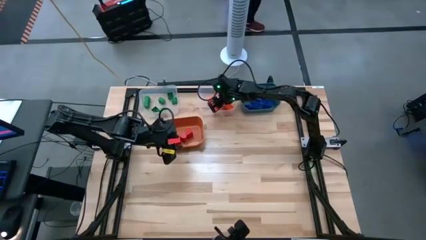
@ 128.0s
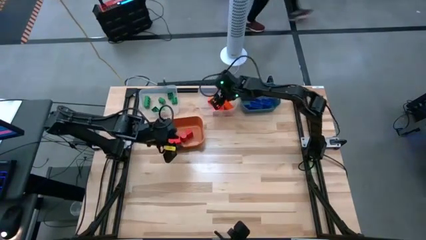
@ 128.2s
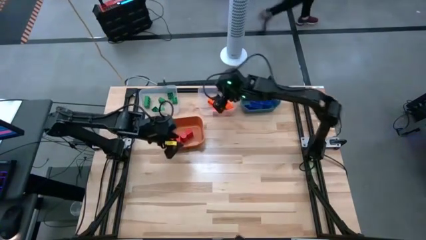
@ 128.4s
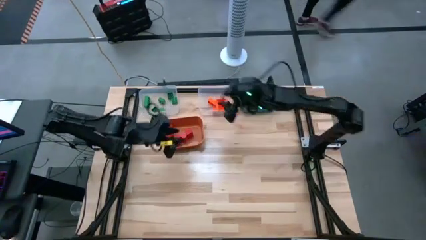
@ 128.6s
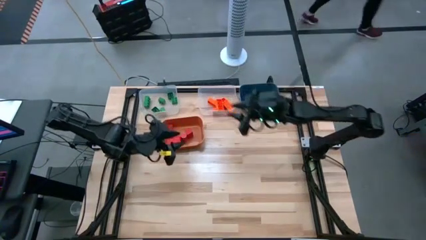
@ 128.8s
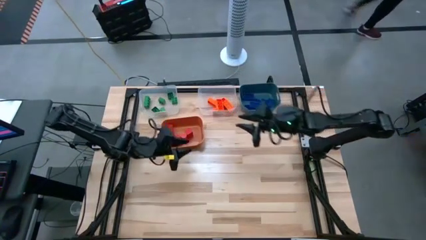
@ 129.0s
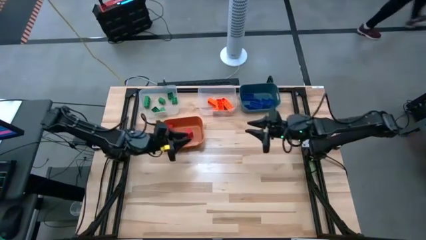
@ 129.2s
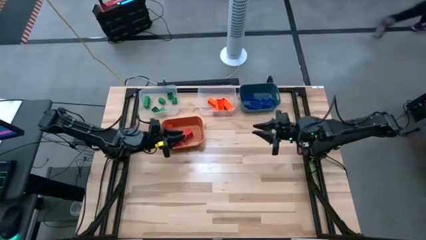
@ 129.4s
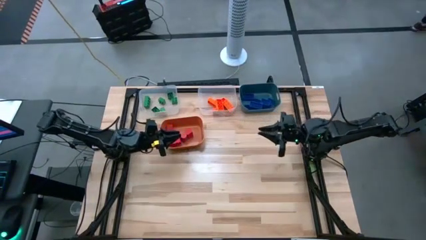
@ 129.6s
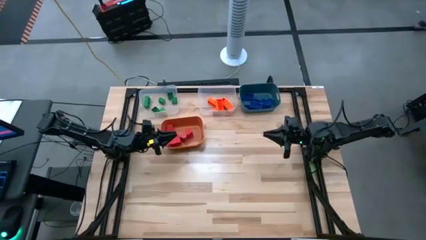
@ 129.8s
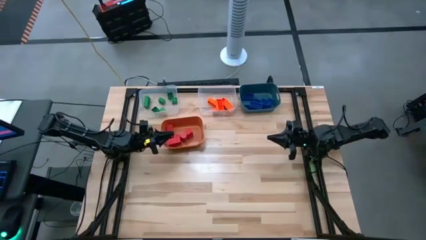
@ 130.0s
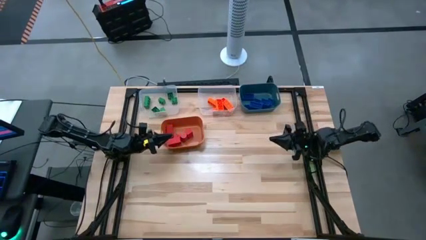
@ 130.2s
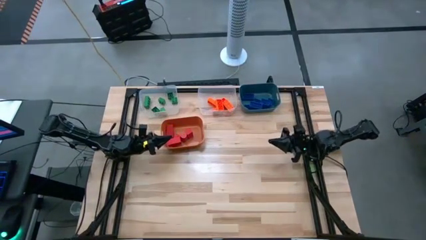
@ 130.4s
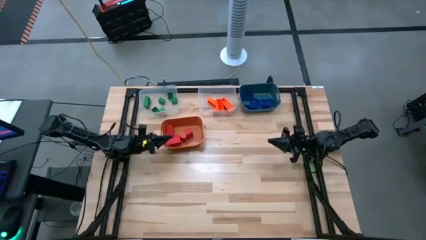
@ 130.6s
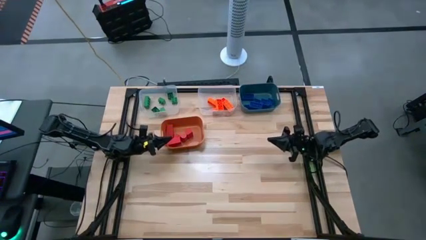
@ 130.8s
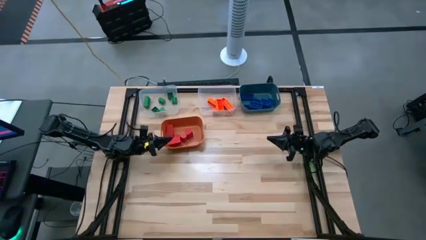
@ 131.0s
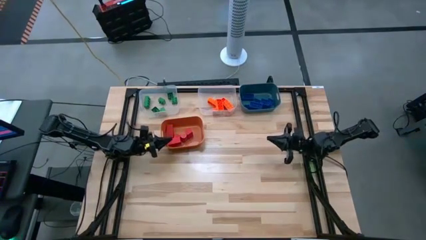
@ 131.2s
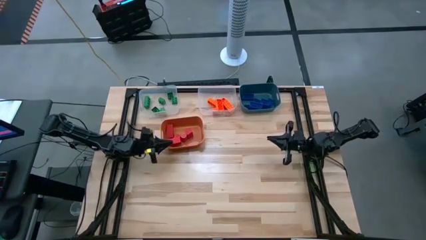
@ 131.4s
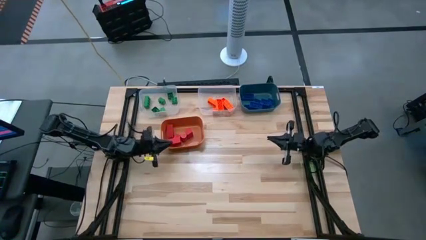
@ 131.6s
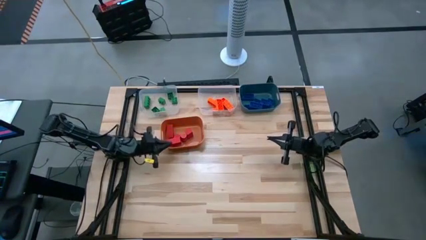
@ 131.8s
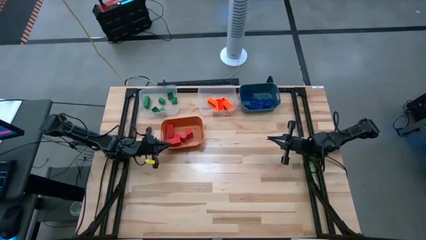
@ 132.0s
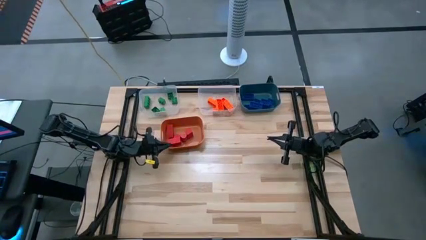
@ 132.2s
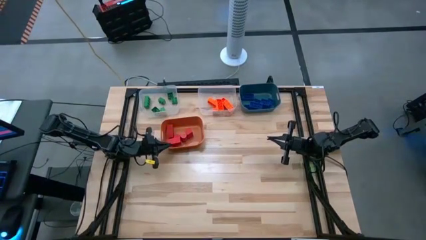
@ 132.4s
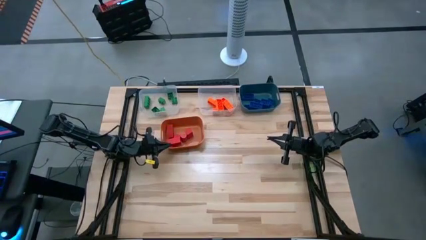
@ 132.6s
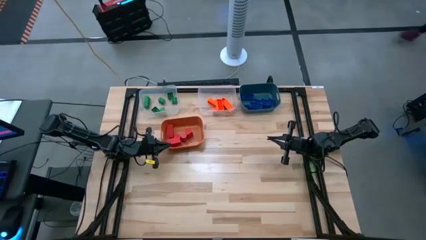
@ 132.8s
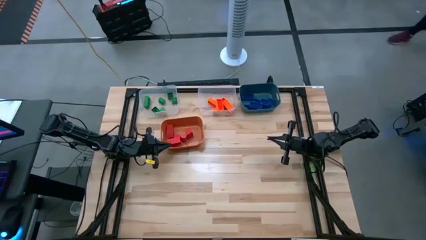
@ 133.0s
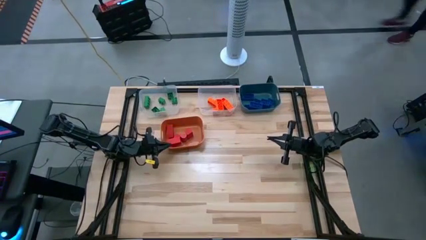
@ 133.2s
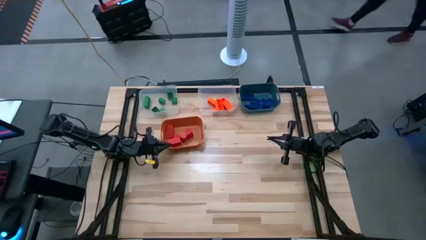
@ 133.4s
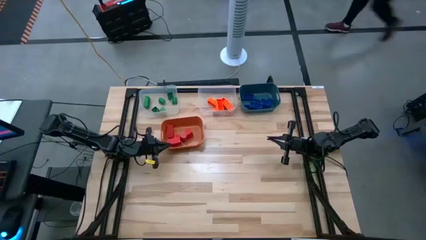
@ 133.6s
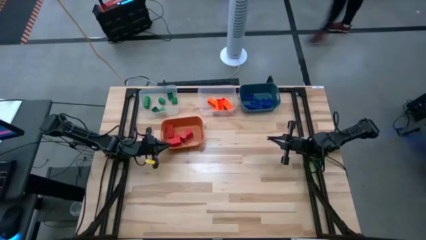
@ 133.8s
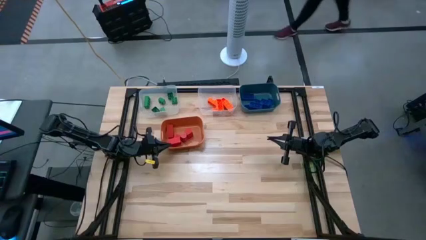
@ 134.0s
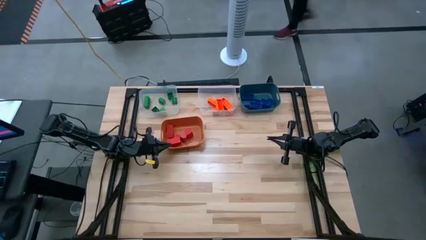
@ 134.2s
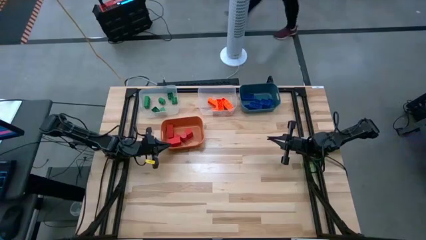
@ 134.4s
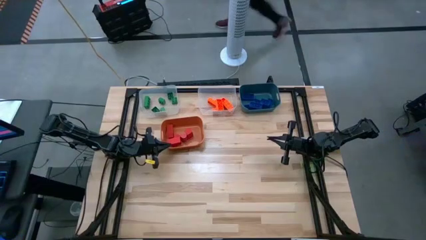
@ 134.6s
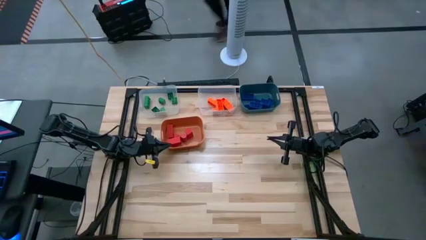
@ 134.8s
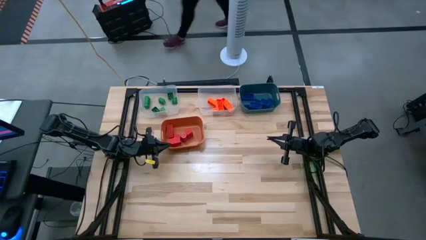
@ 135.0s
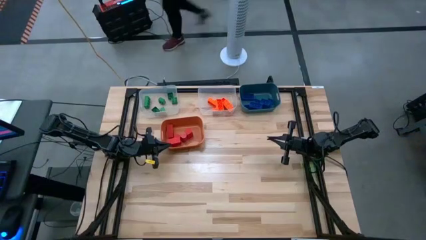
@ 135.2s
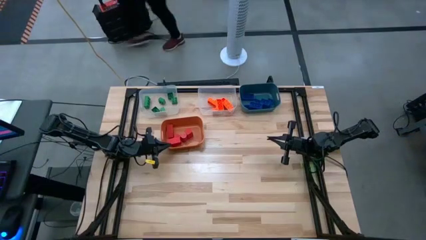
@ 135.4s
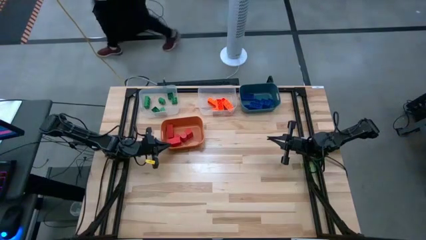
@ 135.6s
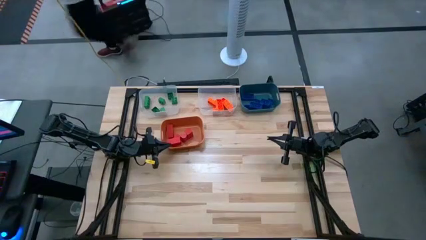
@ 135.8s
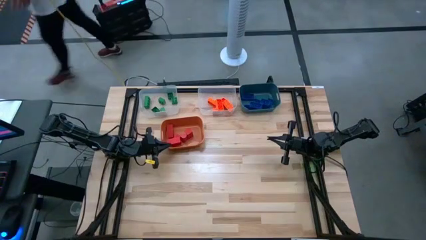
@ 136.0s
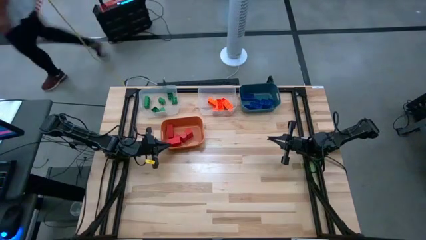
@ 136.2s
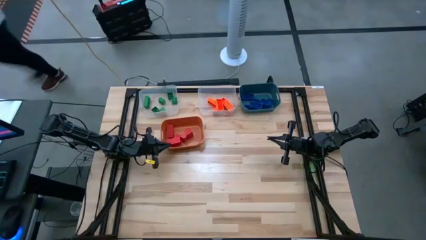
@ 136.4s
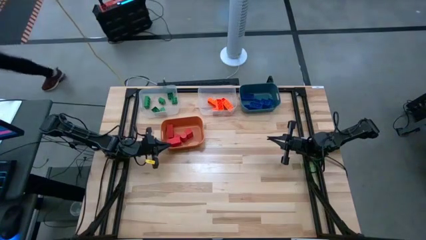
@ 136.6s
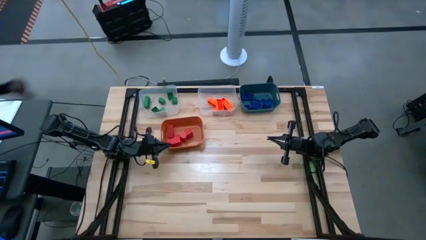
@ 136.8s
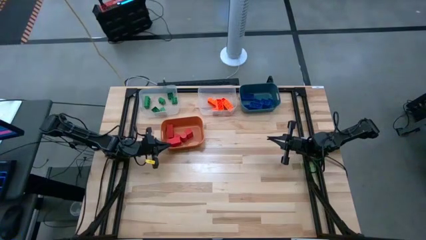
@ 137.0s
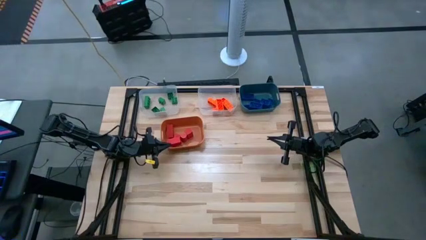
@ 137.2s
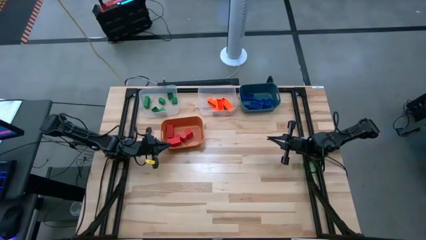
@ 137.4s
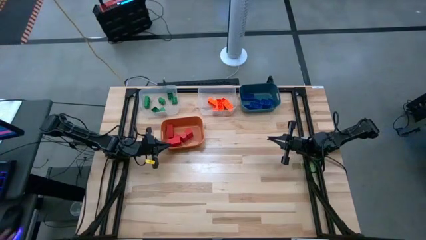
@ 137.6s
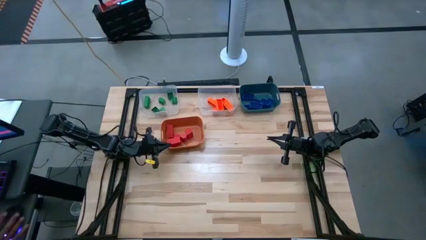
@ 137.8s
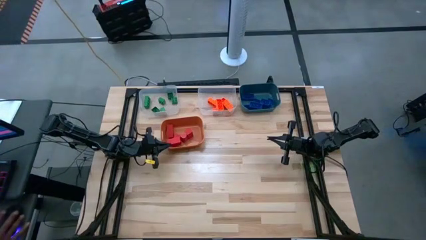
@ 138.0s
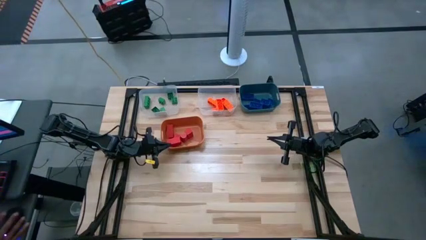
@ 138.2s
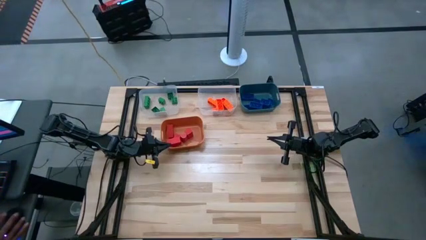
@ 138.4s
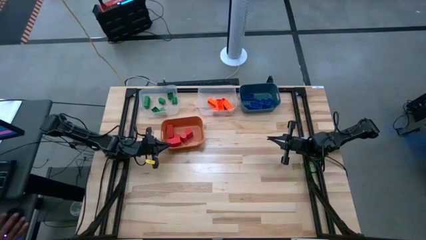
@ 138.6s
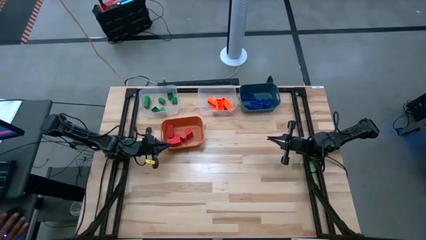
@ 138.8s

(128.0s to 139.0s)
Task: Sort blocks
Return to Home Position

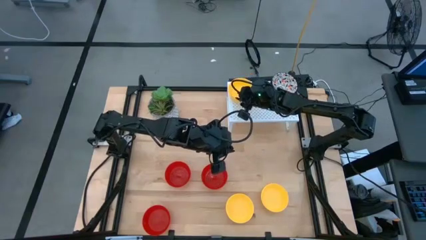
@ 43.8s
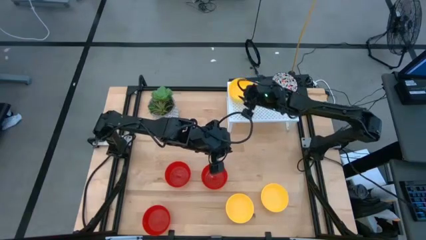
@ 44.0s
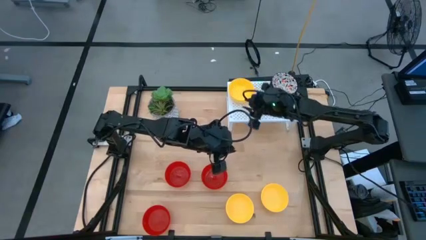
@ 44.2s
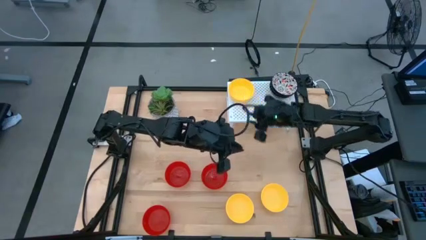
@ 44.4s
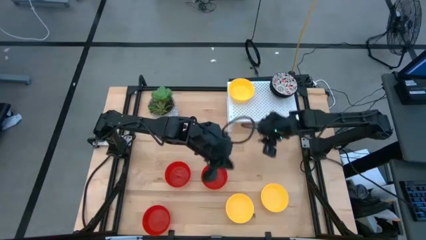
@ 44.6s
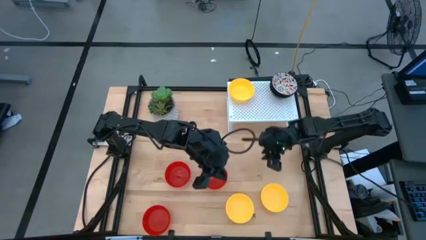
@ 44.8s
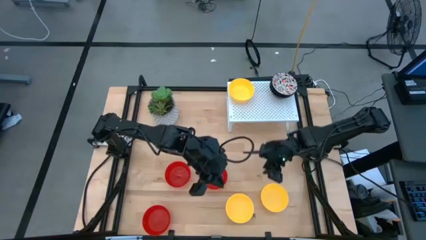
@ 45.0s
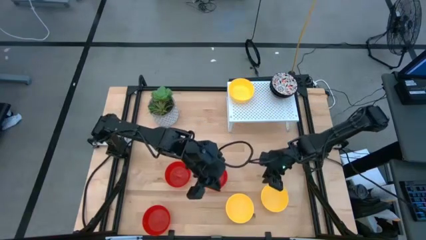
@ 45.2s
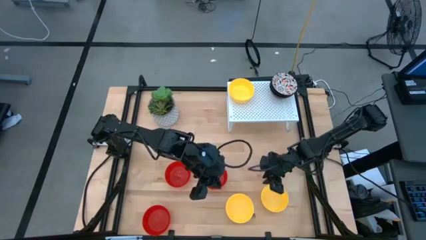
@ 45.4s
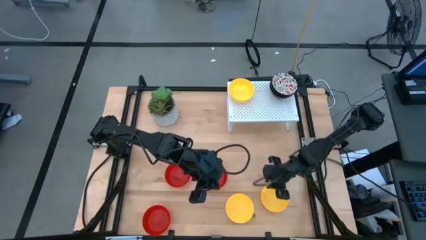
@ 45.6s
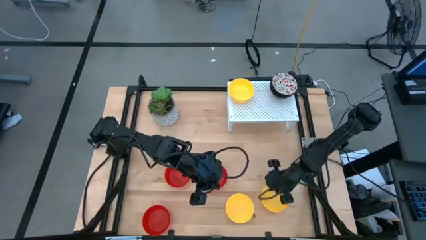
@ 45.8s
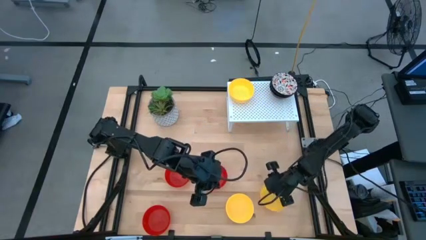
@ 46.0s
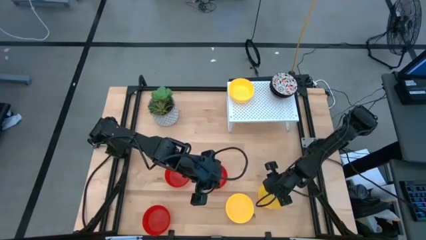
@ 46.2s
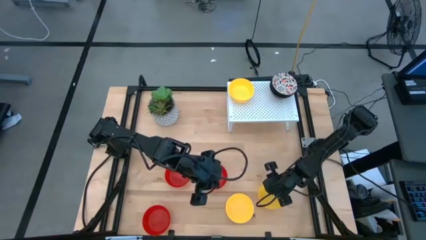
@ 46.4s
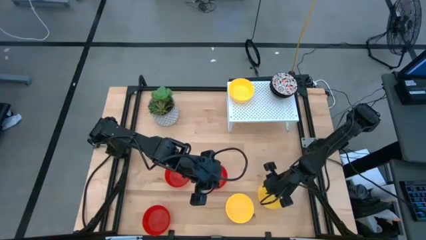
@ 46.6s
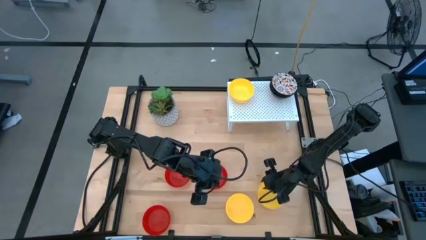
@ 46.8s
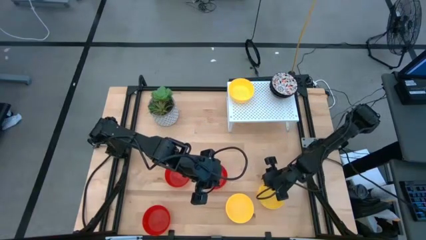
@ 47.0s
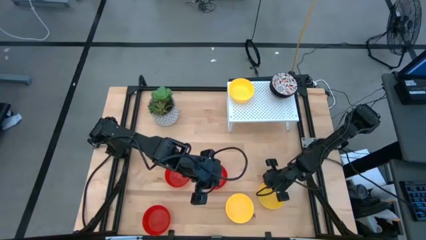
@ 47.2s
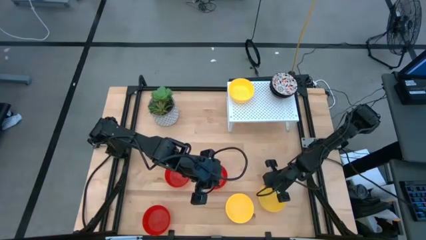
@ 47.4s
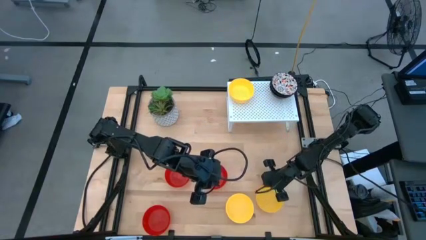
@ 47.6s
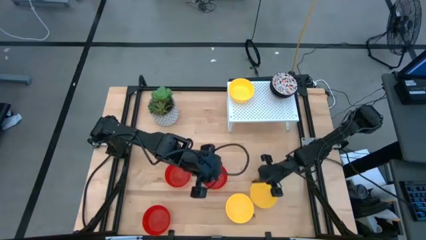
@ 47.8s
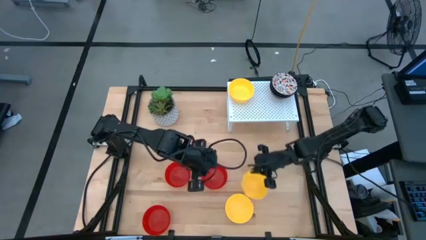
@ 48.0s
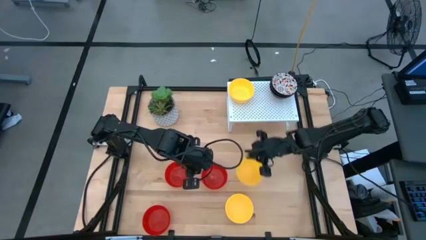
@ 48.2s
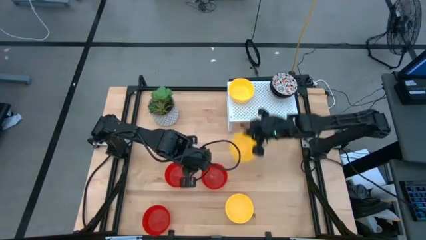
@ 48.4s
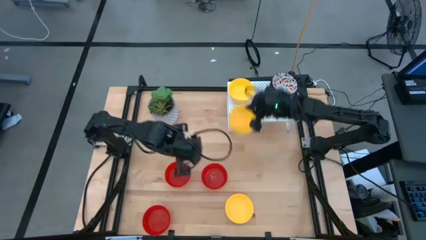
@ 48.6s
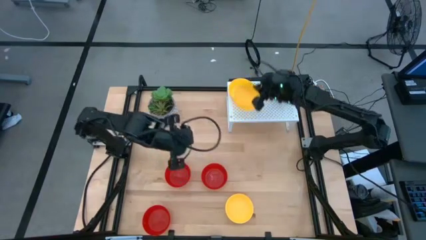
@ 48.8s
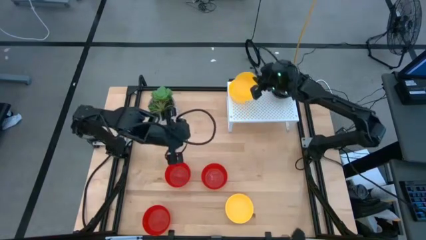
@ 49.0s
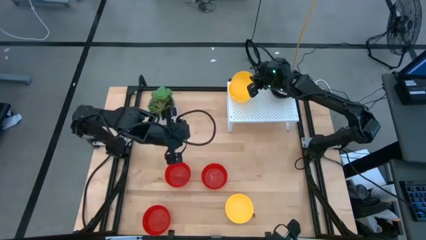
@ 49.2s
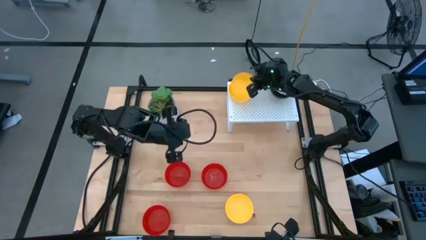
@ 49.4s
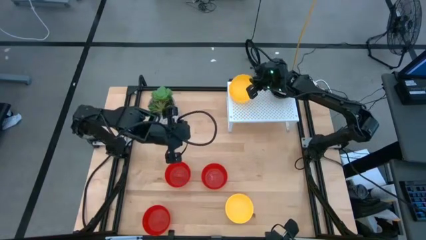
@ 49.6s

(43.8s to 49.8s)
Task: Pick & Place Mini bowls
Stack the yellow bowl on top of the yellow bowl on the shelf
